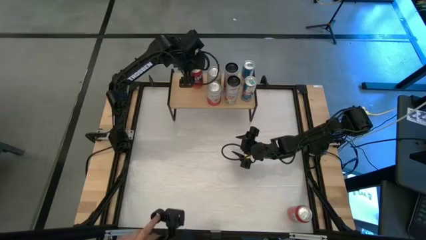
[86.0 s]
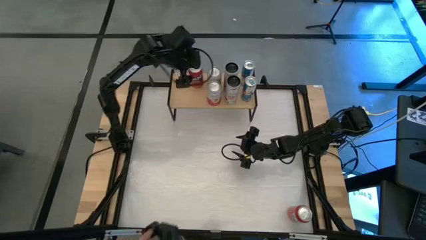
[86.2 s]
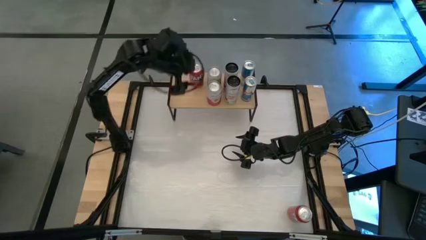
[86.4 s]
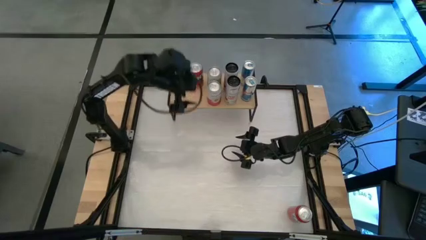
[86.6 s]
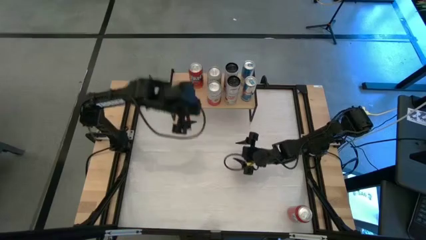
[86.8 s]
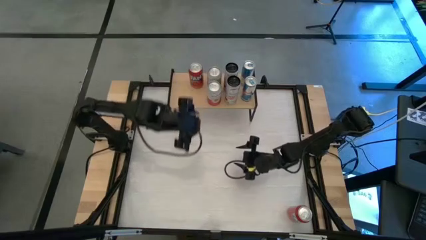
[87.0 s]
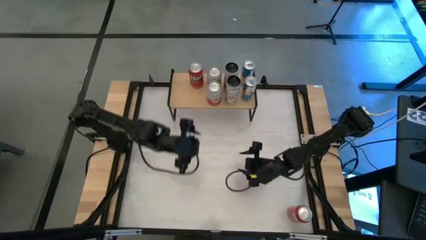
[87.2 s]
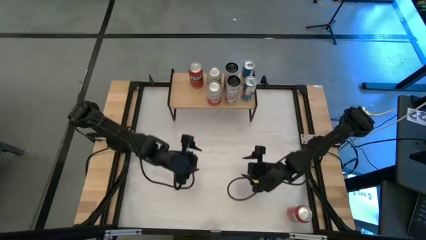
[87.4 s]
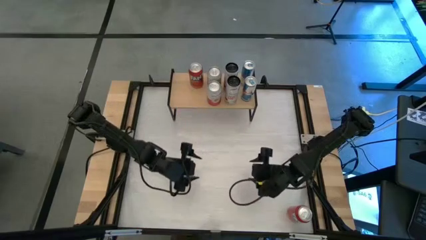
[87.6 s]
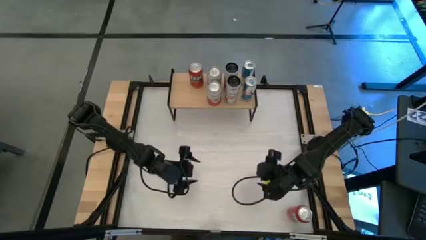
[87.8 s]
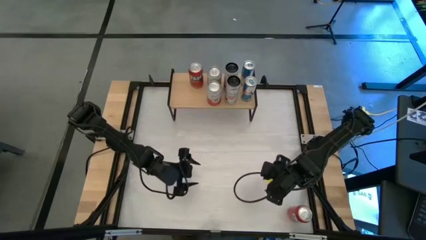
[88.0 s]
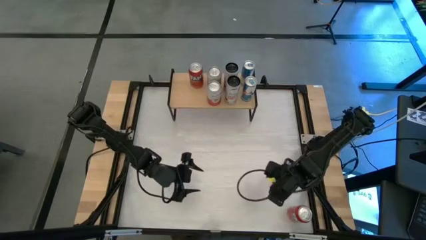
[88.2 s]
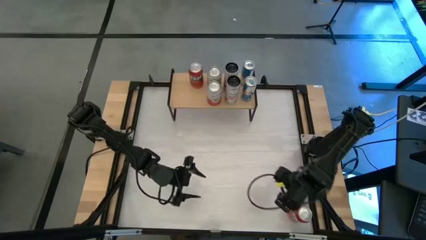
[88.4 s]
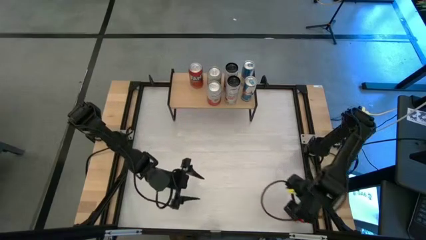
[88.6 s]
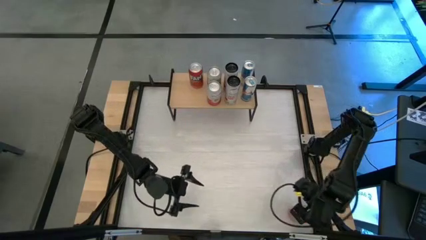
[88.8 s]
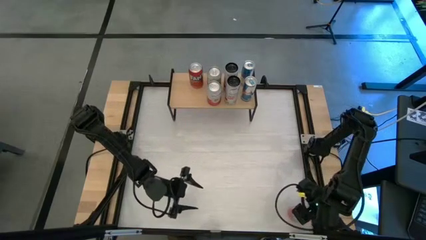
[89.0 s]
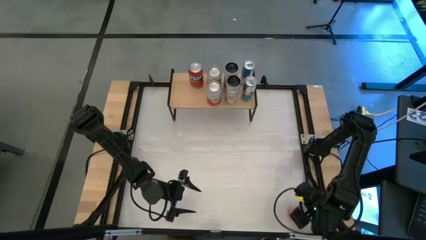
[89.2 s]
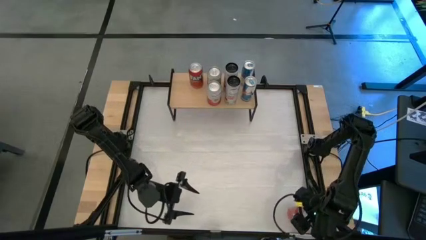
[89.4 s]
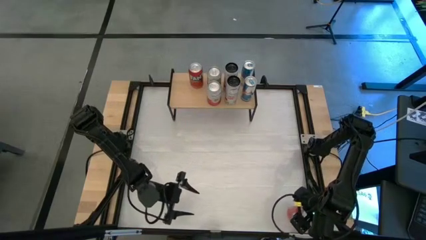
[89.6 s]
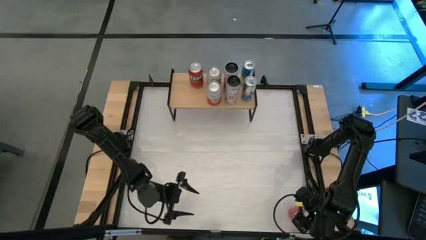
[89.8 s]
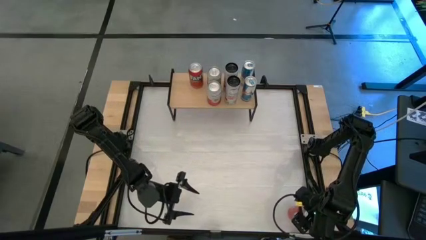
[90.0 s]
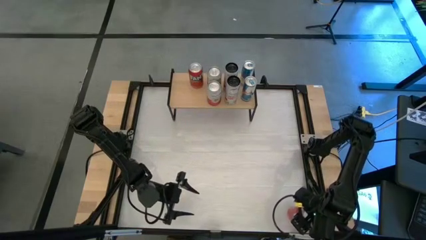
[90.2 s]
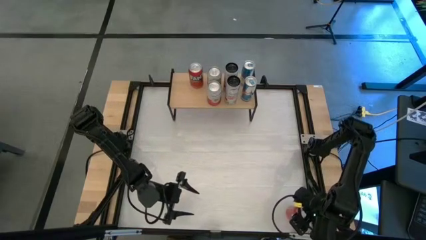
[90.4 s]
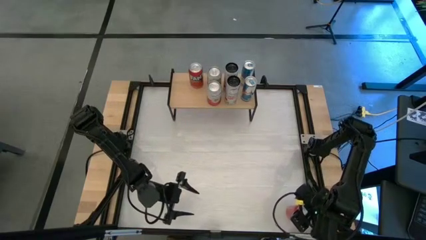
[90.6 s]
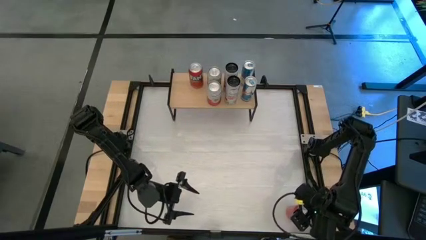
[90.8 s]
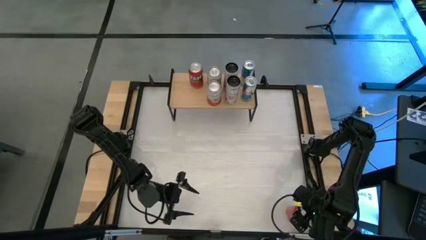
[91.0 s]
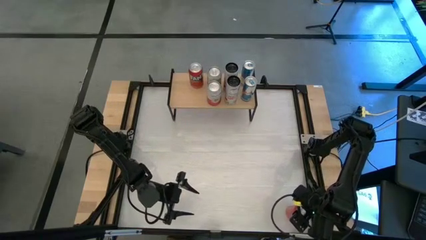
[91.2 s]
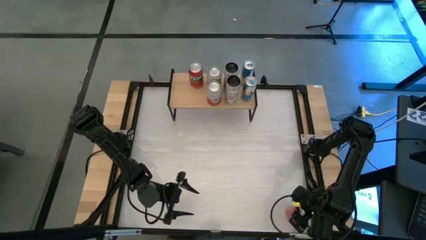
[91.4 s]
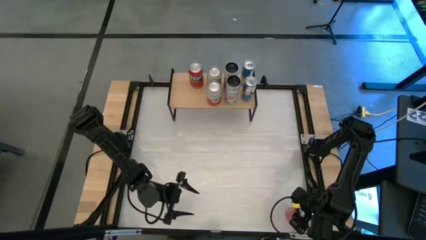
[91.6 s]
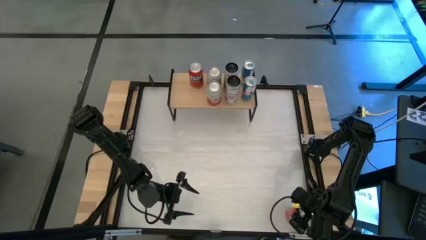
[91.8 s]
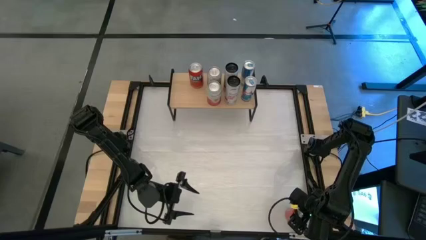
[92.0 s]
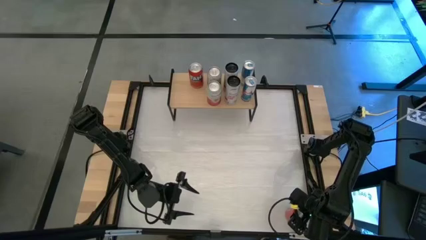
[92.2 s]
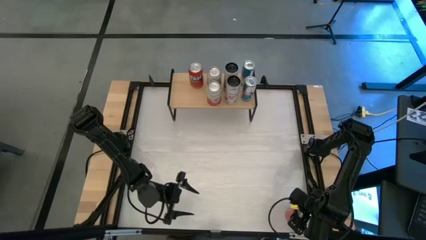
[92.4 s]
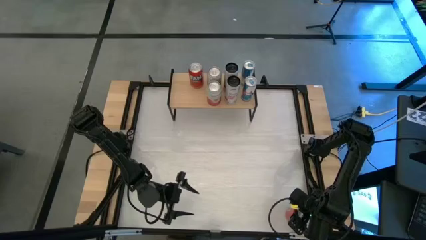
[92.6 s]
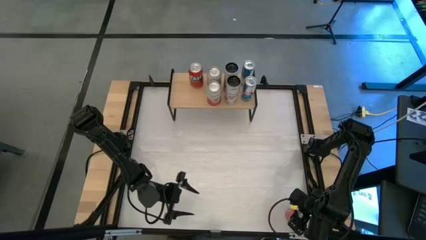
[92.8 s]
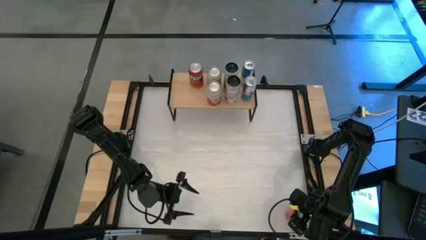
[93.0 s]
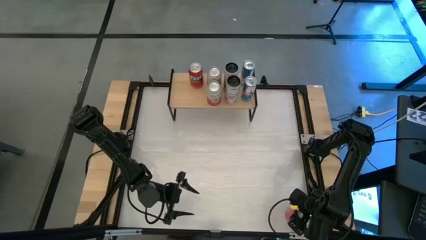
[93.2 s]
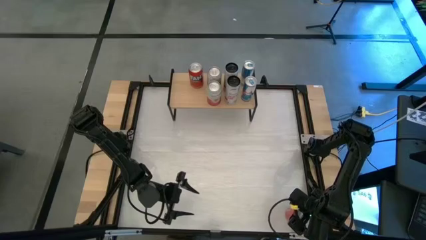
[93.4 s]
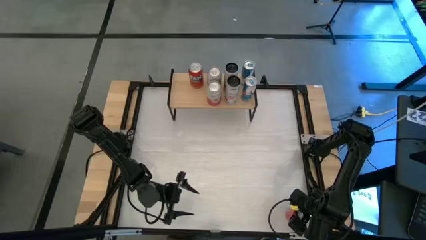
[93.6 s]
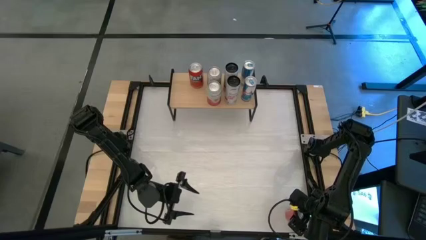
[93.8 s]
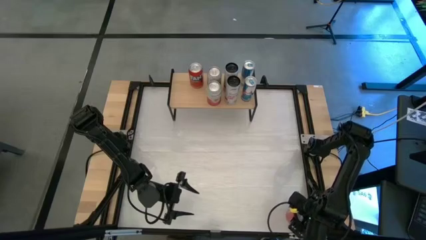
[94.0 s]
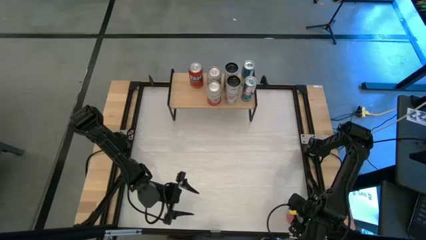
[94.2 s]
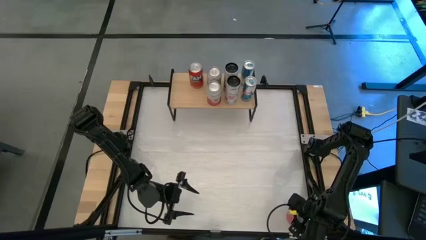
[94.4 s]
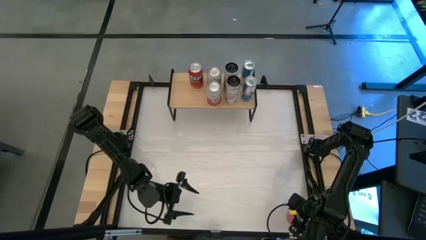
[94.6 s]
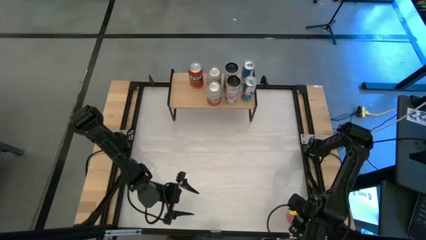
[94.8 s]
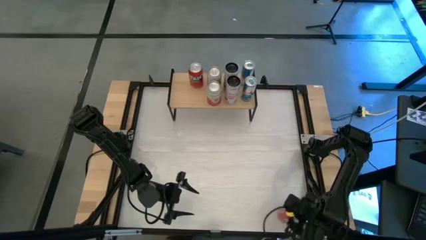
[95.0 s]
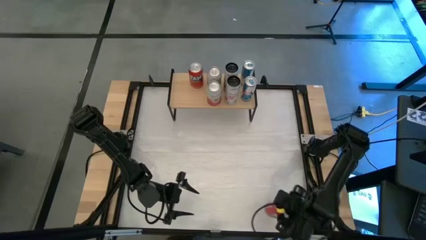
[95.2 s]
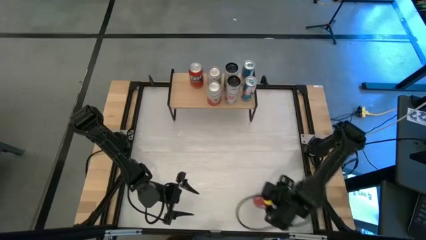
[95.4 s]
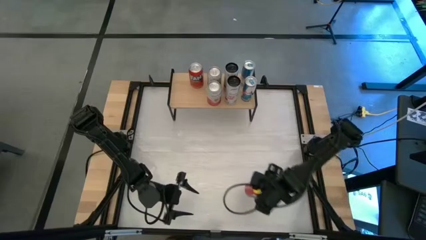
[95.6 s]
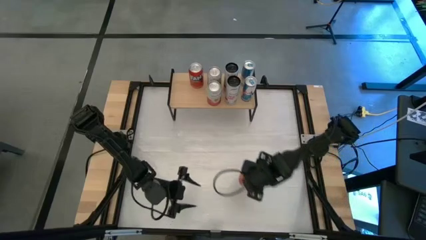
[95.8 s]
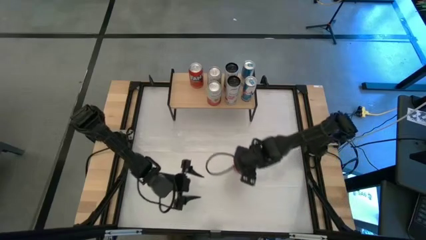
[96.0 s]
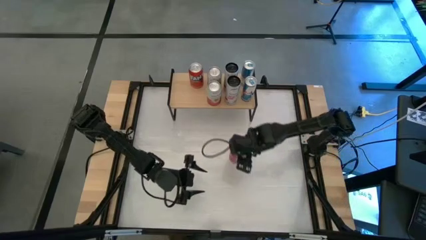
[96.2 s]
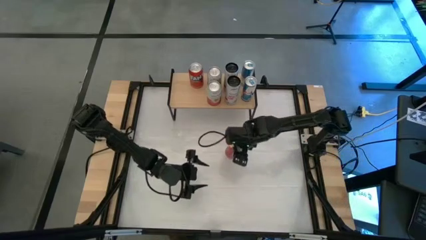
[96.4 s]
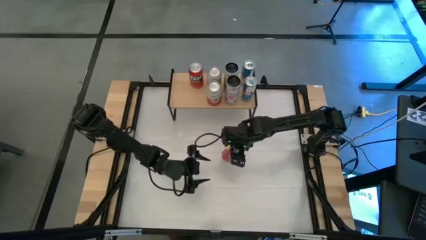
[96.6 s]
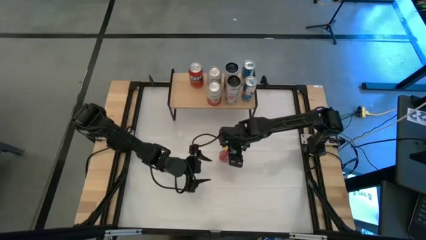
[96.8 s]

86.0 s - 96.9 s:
Task: Place canned beverage on shelf
Put the red soda can on the shelf aligned with the other red soda can
